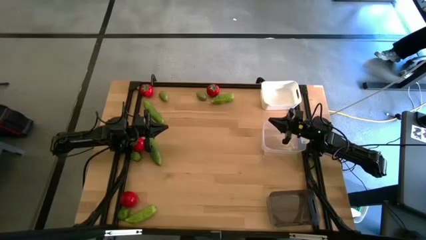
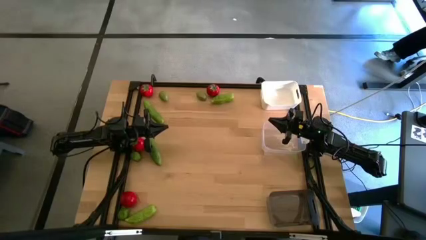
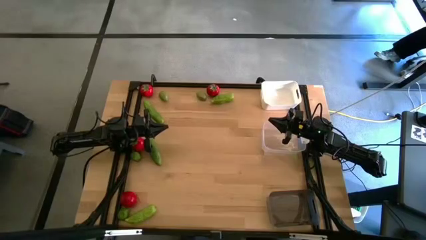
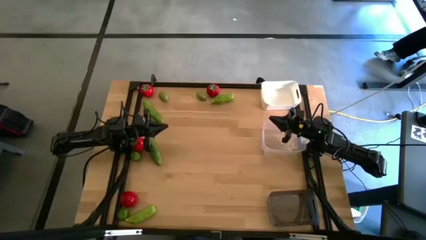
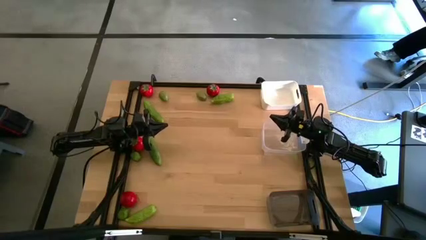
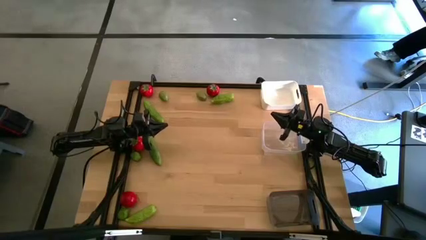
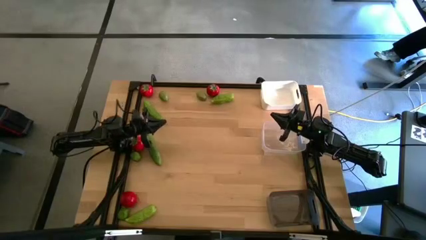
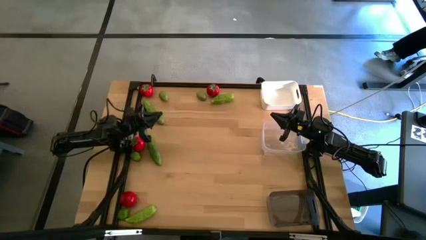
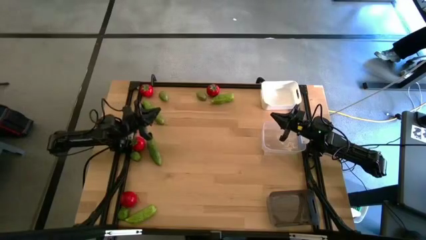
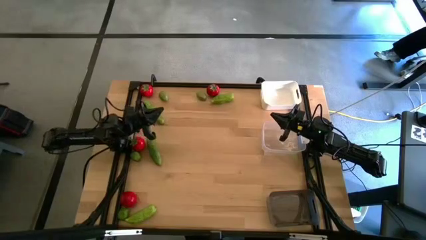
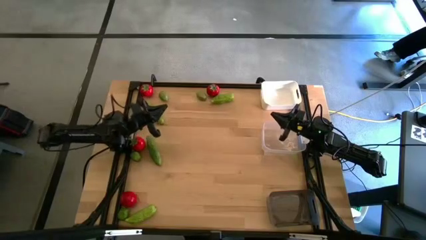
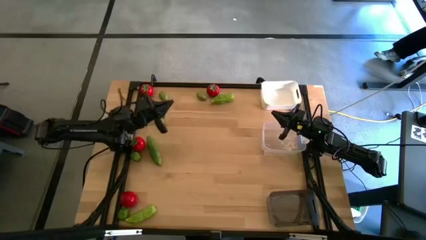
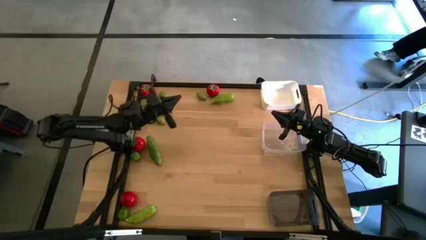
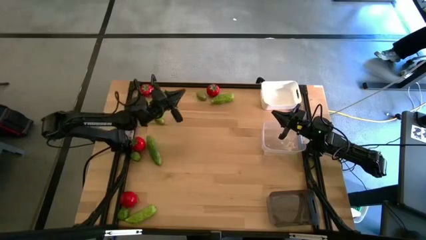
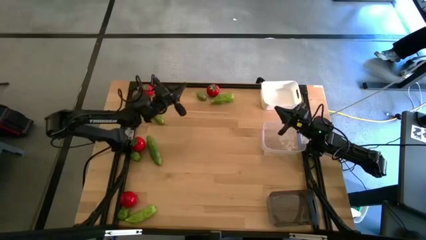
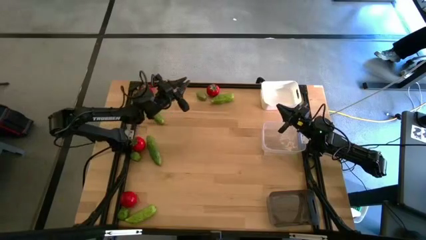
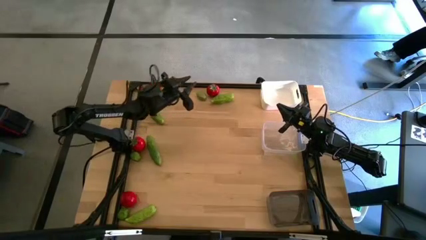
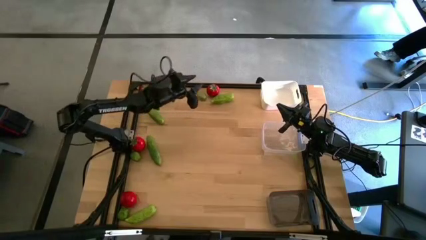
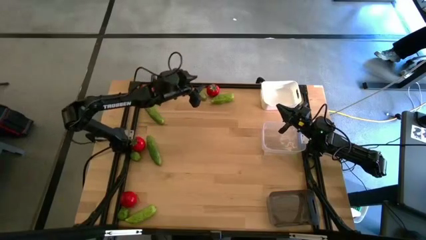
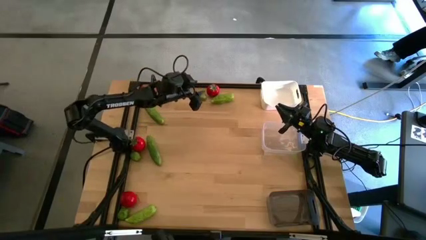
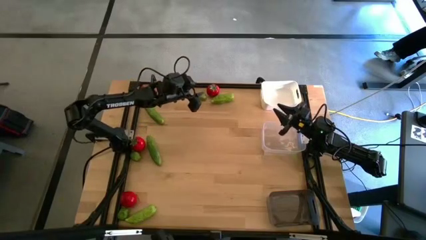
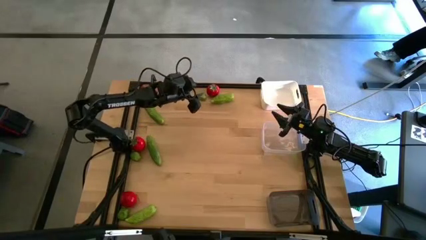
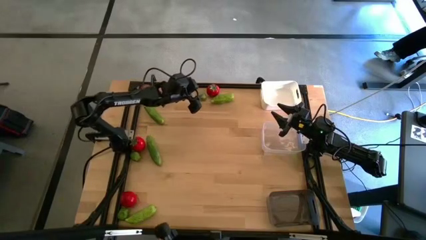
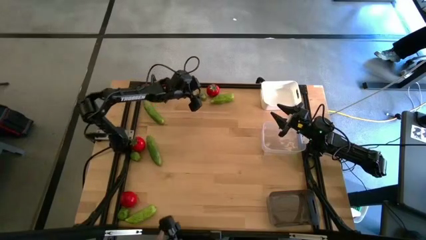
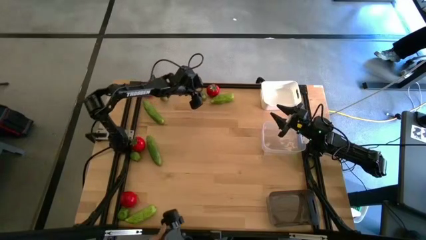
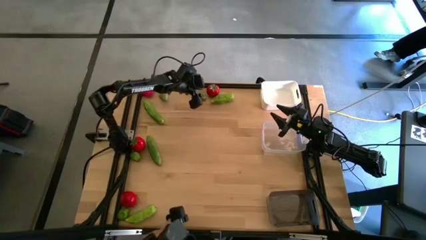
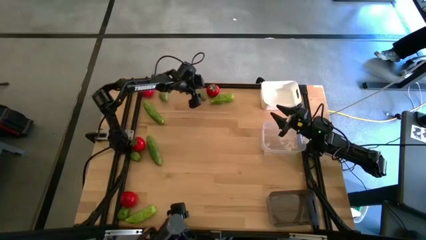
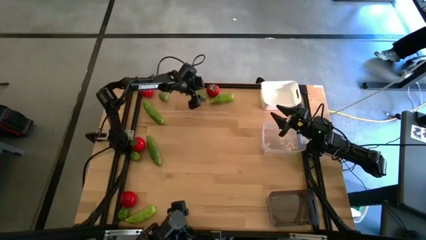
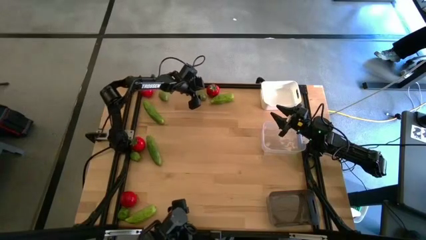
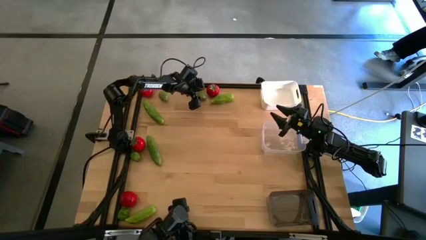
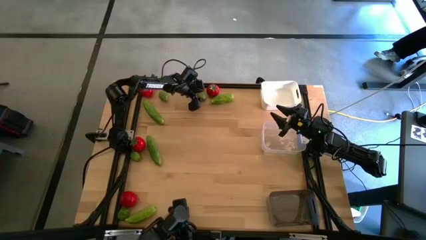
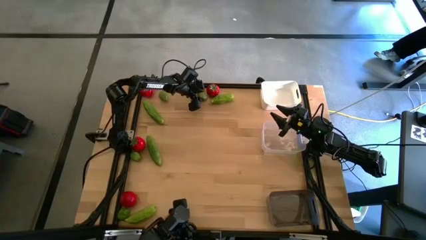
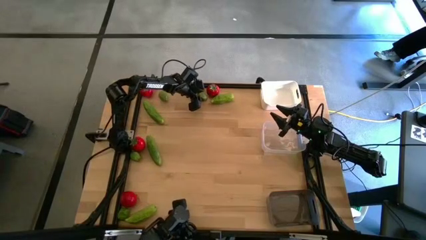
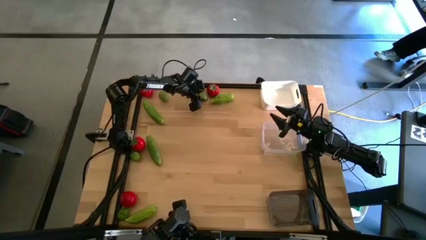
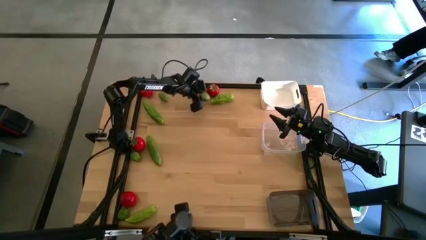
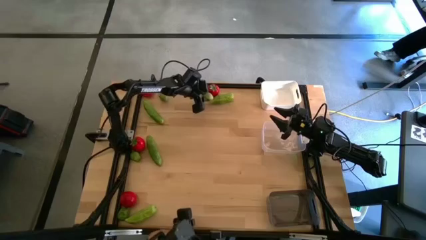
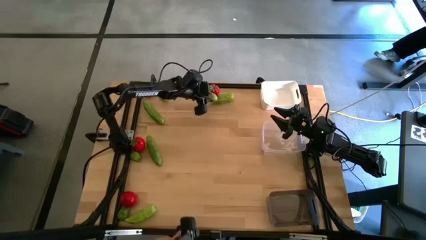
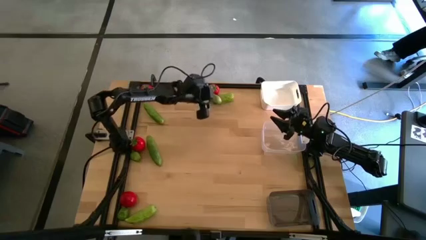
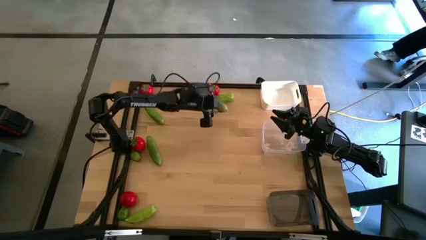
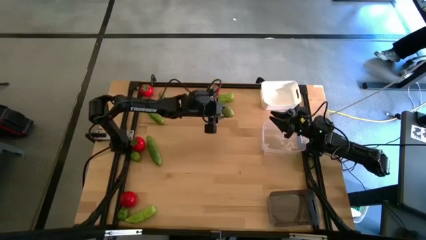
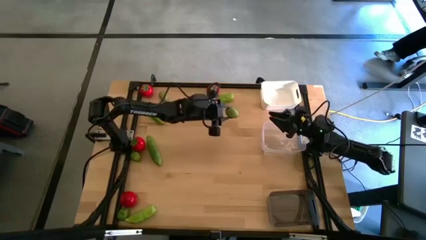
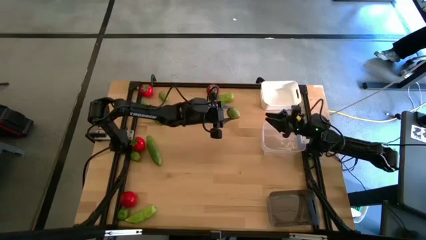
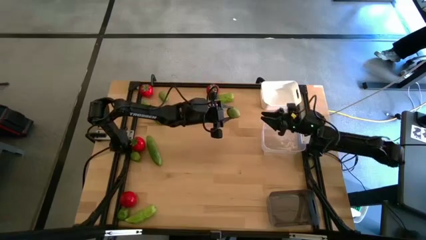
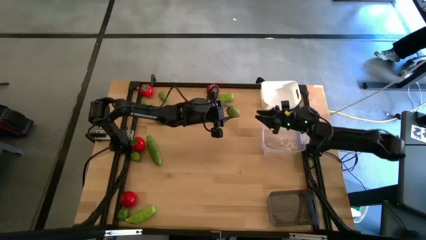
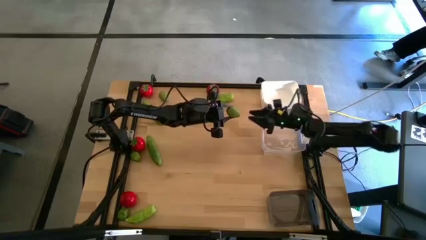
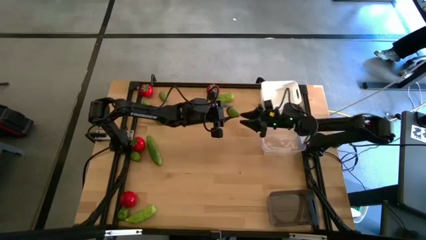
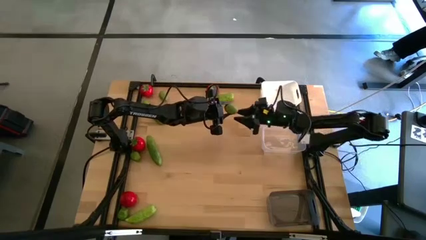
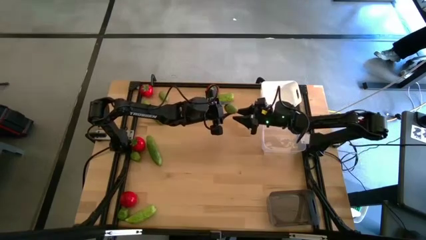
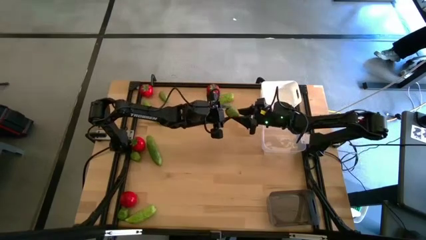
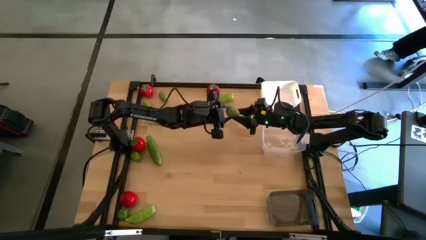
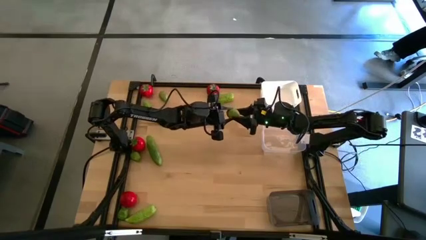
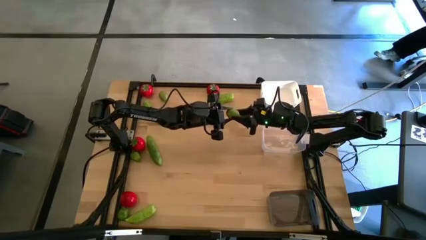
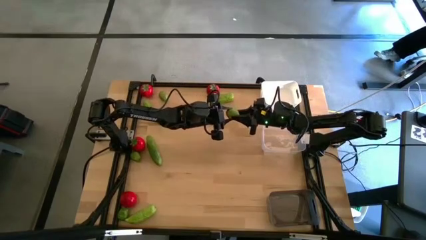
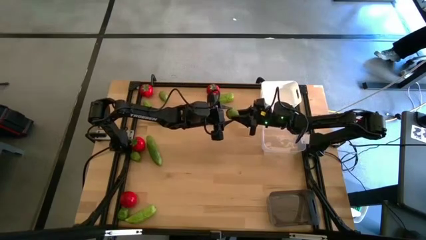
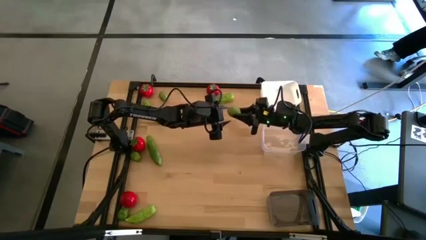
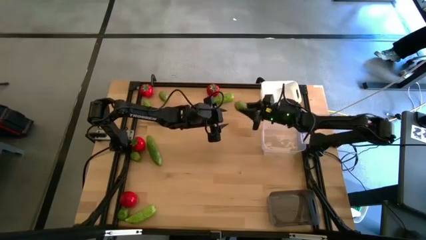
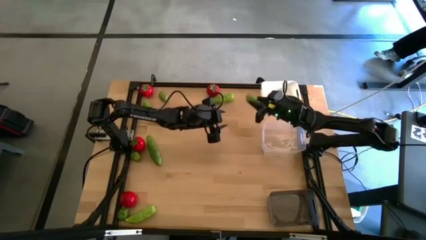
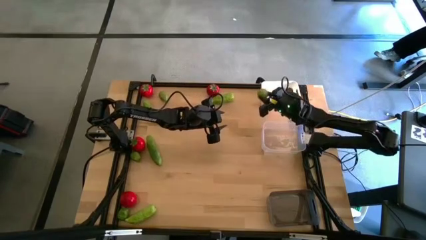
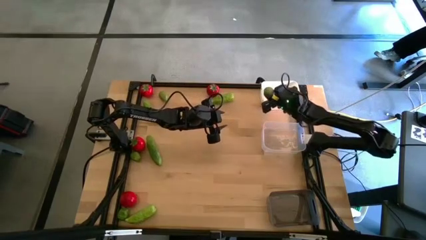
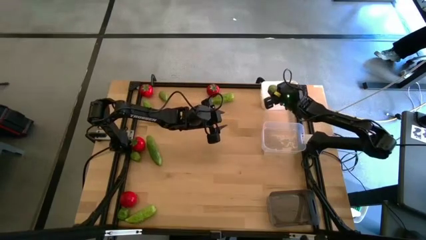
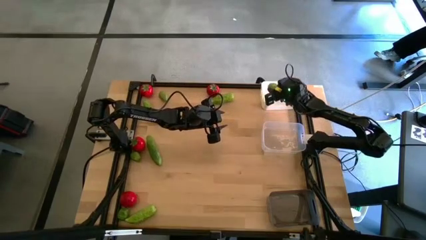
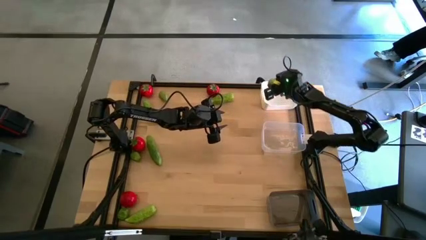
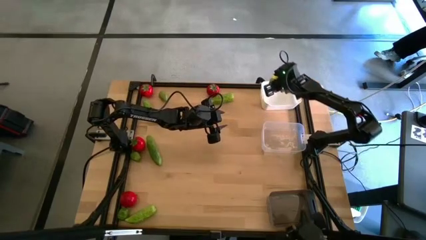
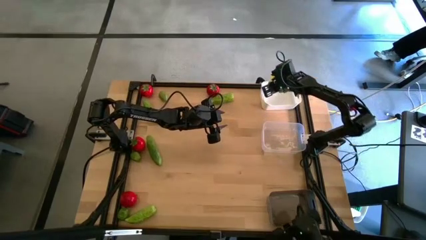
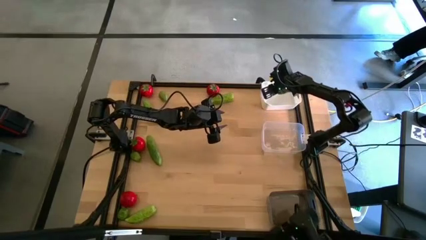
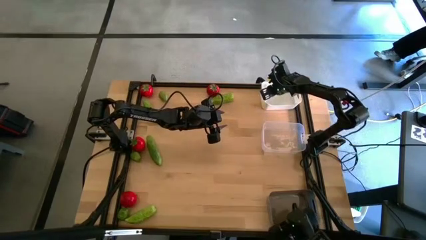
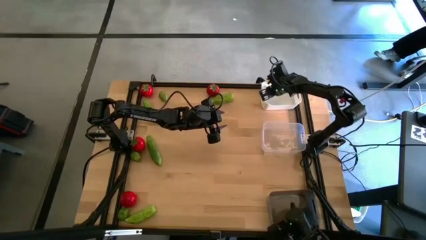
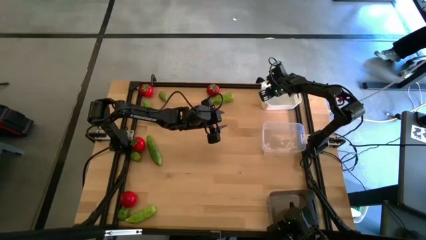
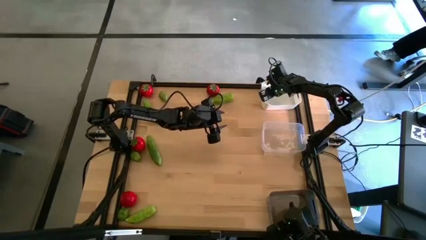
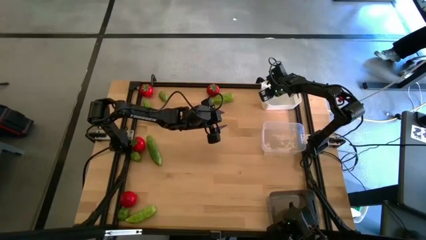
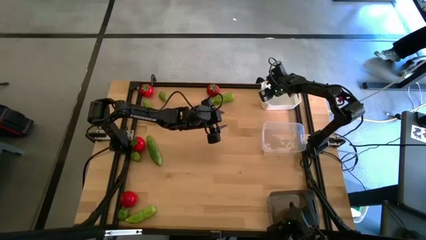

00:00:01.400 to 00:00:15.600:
Task: Sort produce into baskets
Put the top right lime into the white bin
